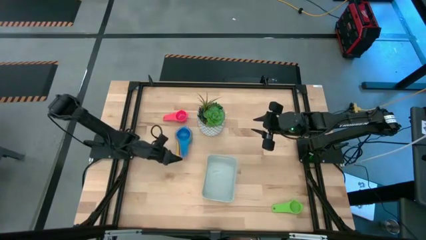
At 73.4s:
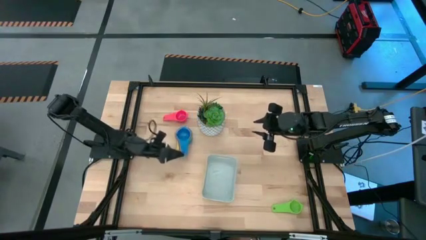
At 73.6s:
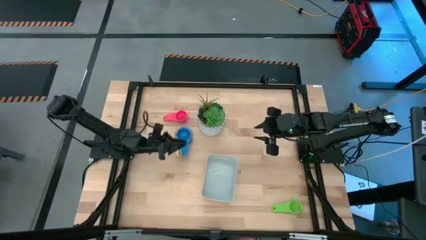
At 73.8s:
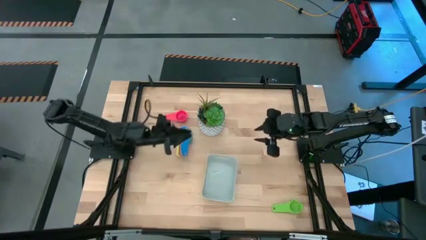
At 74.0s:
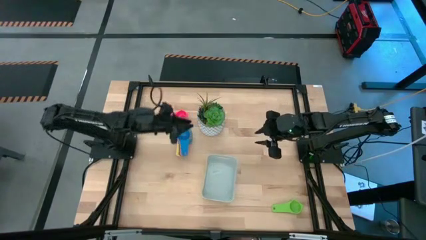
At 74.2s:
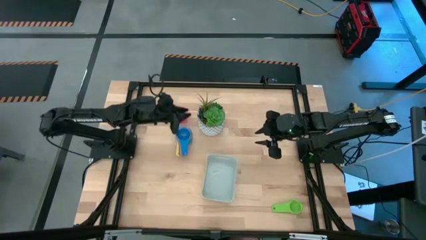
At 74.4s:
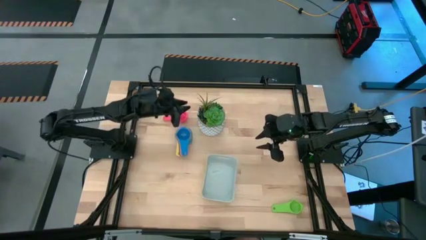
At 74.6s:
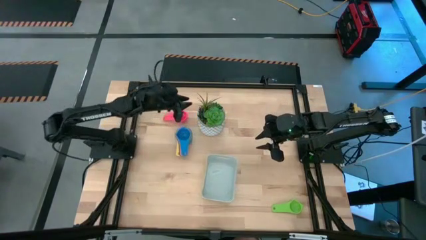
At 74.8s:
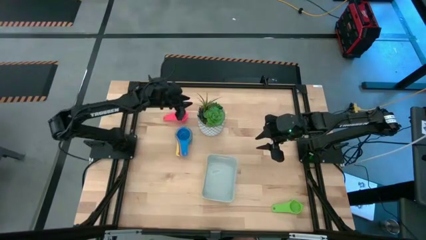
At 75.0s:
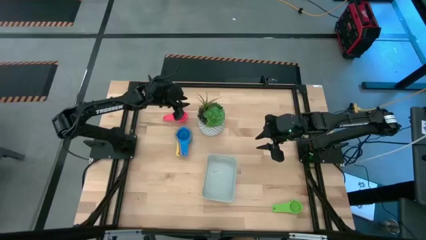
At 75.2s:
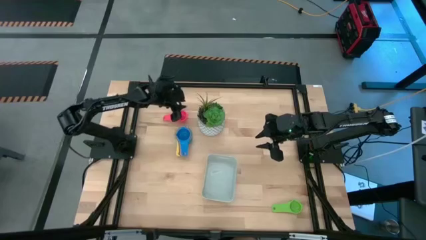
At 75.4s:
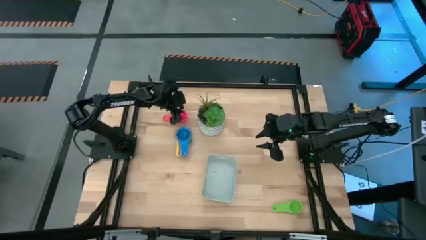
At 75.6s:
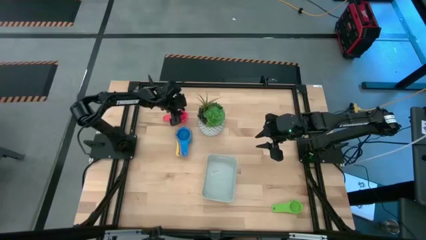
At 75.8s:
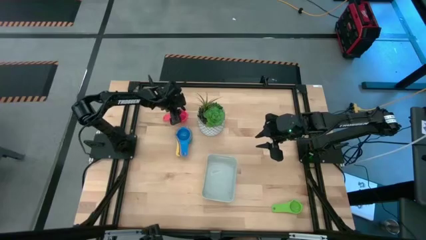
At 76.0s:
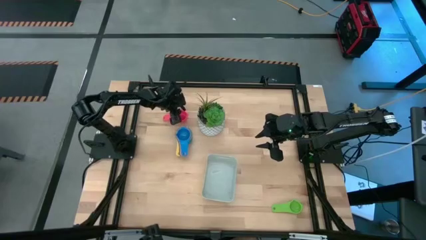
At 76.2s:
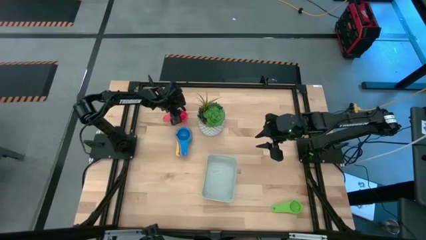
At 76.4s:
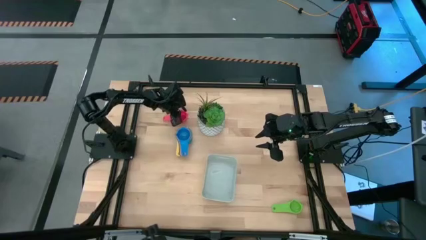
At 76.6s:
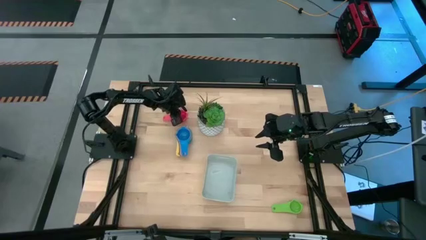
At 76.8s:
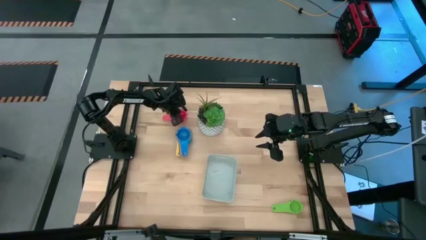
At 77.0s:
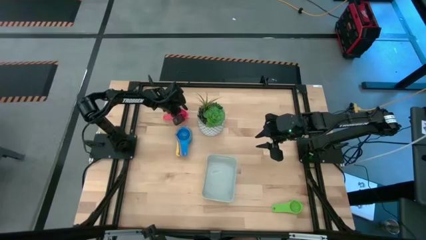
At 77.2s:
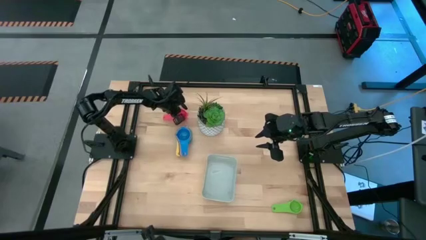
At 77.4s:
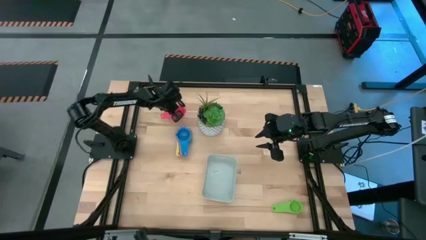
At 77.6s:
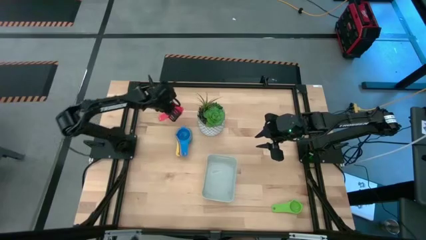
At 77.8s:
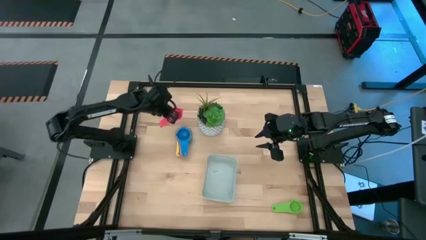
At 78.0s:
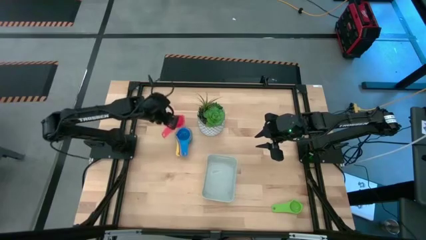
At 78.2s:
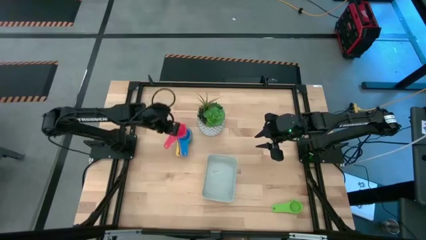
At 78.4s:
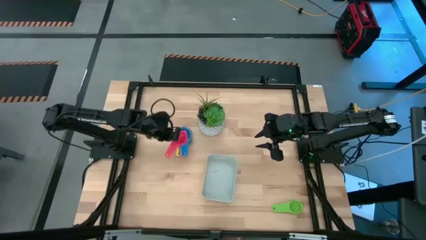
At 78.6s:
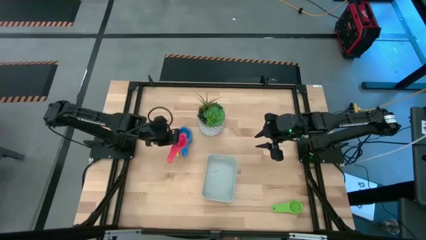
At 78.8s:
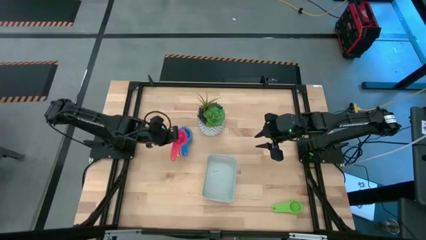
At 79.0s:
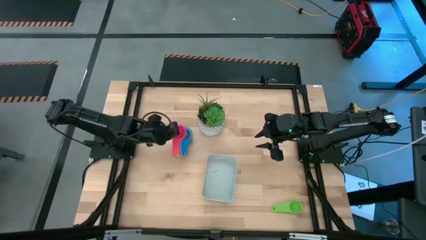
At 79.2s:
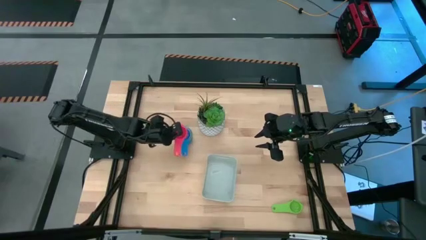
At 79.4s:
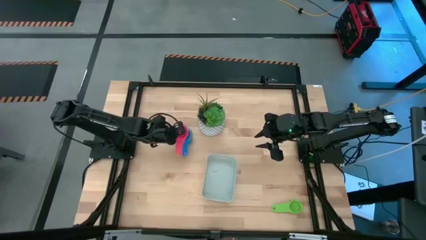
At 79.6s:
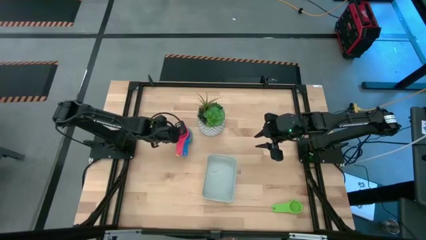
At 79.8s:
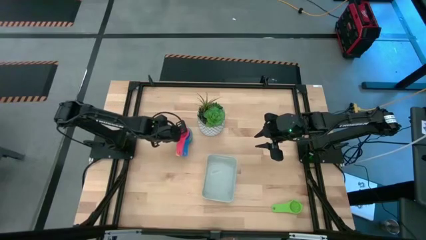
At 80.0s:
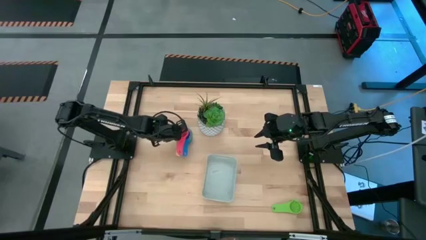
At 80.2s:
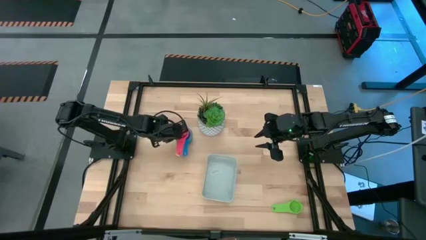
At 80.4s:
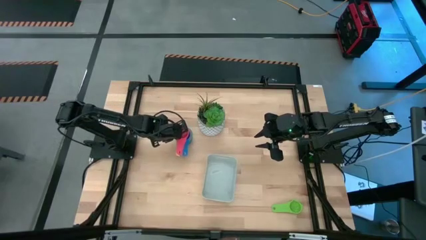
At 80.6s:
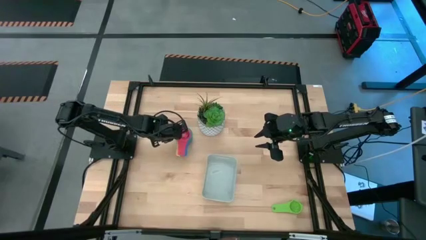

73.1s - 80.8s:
Task: Nest measuring cups in basket
Stack the pink measuring cup on top of the blue measuring cup

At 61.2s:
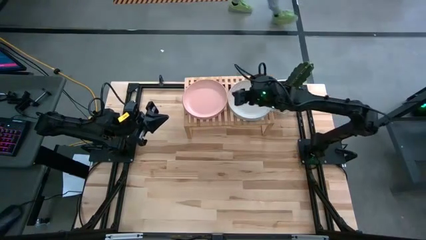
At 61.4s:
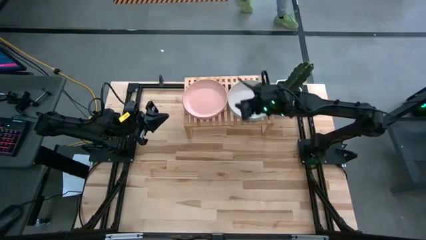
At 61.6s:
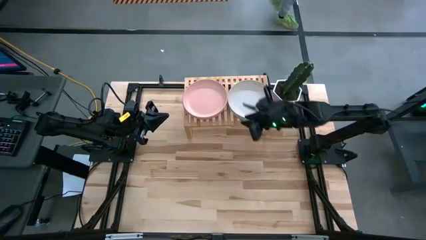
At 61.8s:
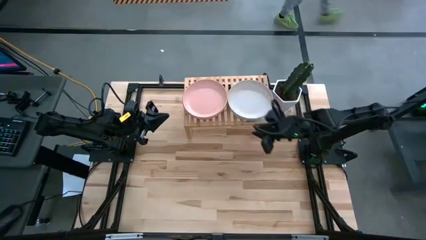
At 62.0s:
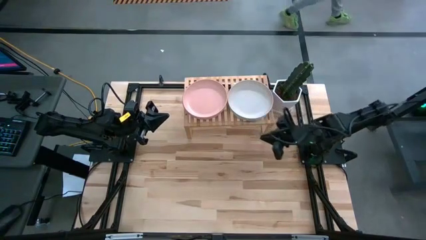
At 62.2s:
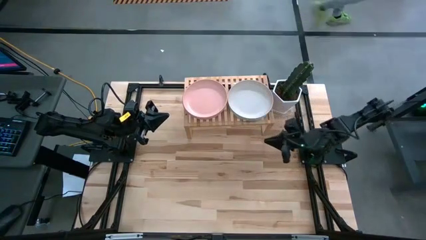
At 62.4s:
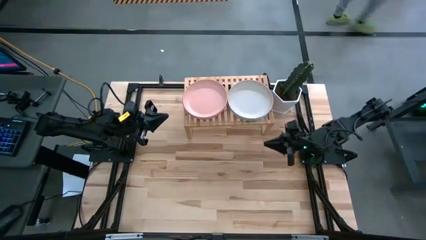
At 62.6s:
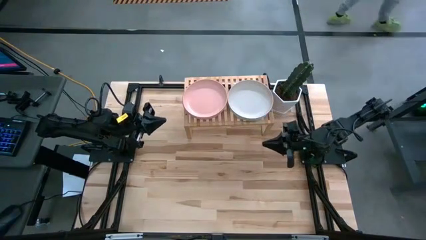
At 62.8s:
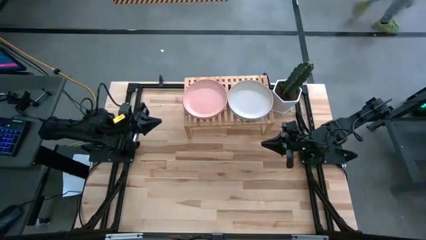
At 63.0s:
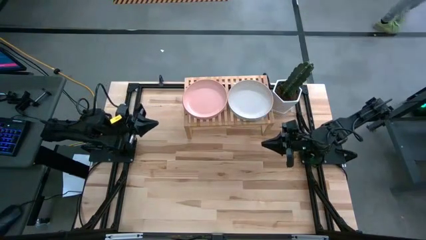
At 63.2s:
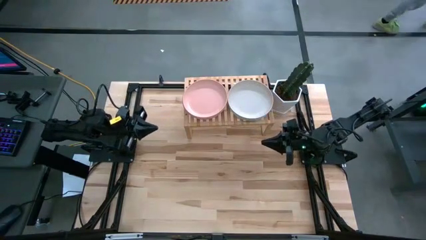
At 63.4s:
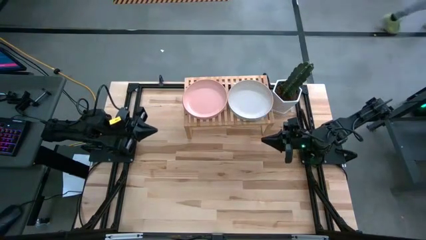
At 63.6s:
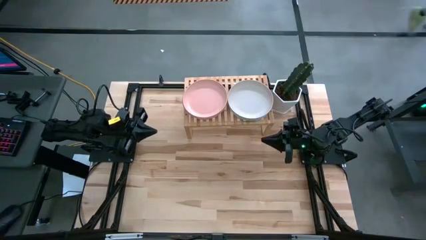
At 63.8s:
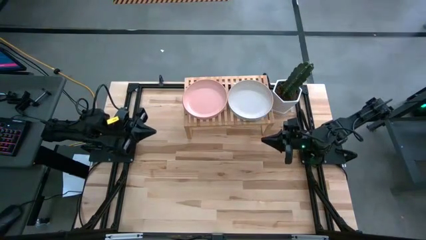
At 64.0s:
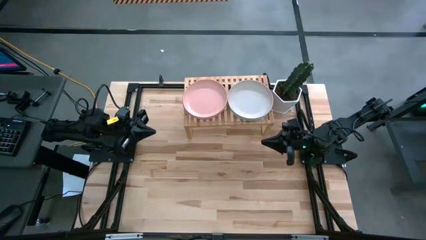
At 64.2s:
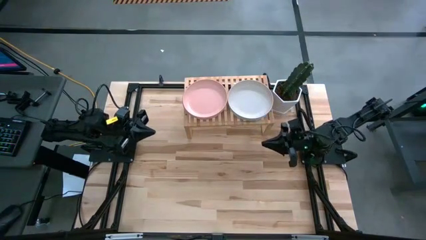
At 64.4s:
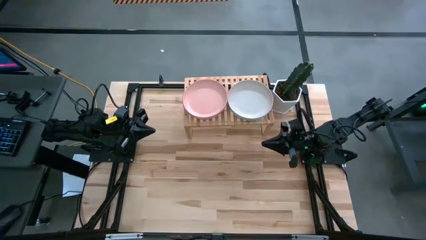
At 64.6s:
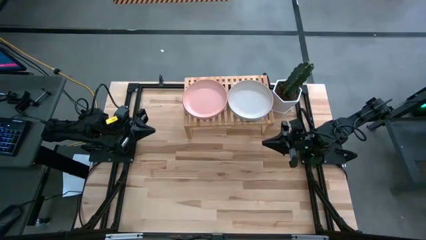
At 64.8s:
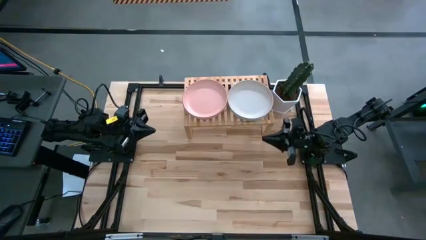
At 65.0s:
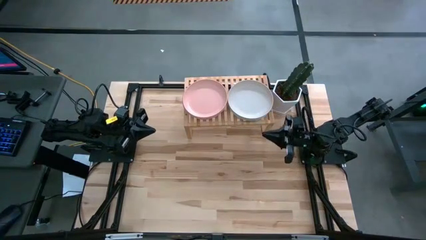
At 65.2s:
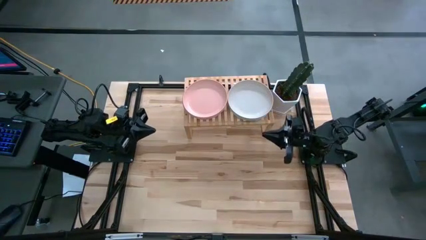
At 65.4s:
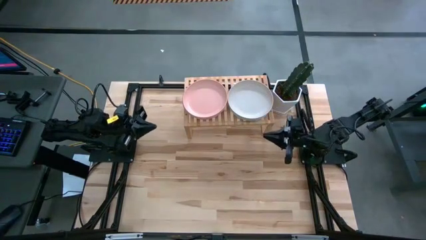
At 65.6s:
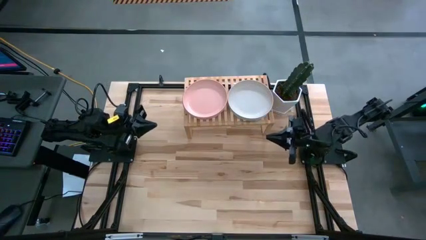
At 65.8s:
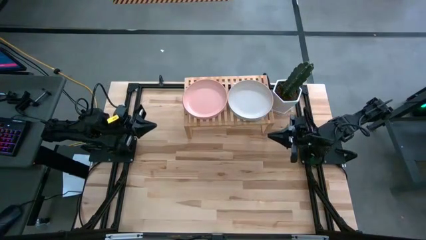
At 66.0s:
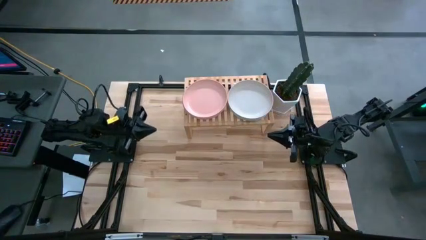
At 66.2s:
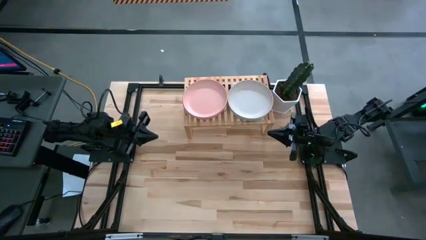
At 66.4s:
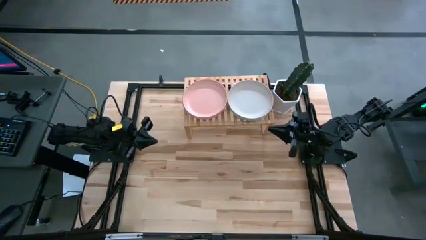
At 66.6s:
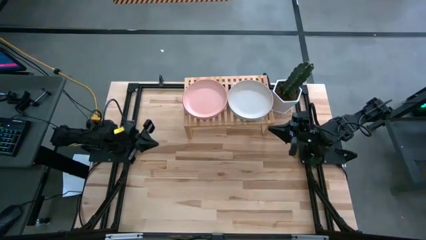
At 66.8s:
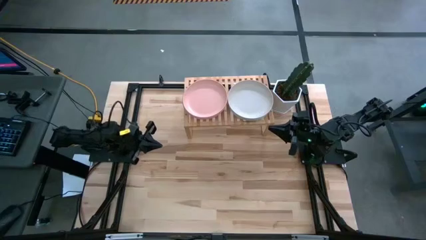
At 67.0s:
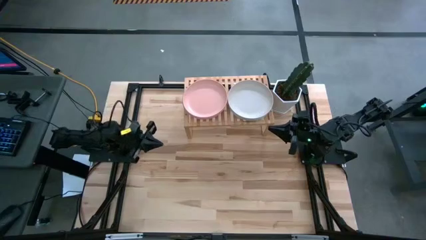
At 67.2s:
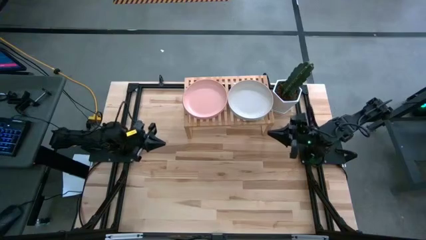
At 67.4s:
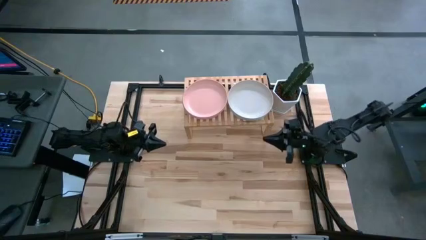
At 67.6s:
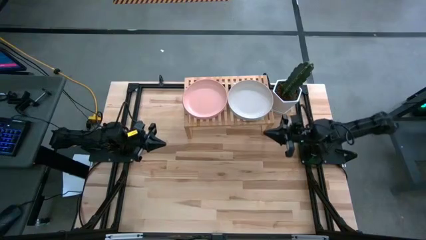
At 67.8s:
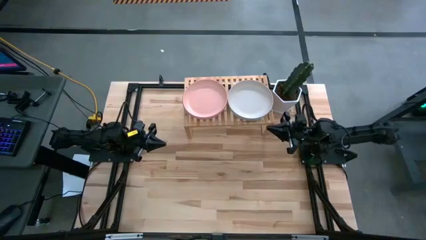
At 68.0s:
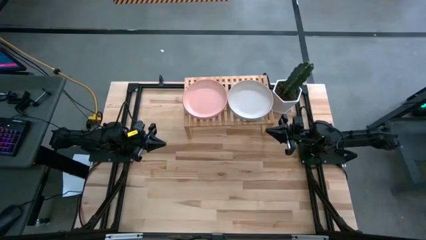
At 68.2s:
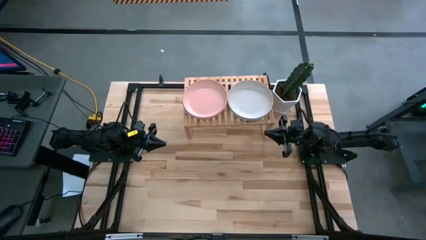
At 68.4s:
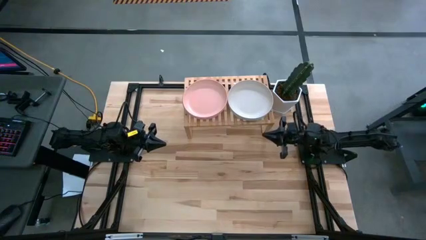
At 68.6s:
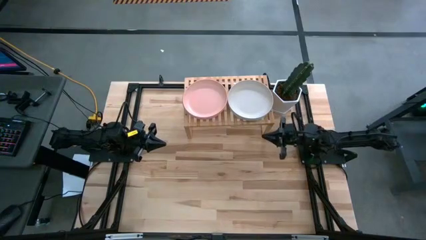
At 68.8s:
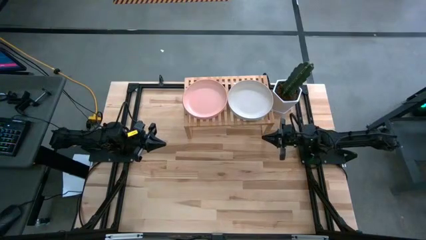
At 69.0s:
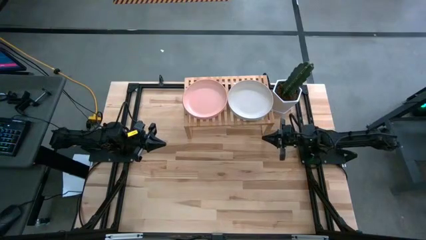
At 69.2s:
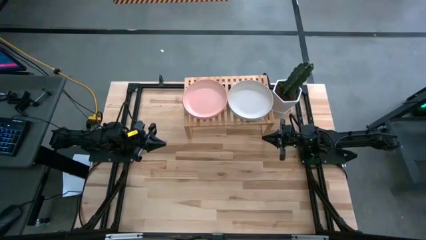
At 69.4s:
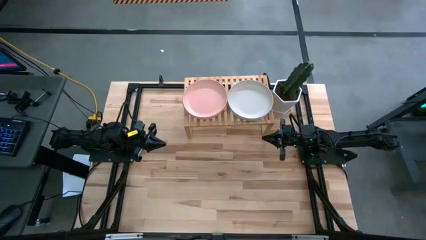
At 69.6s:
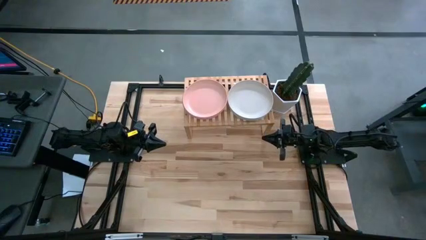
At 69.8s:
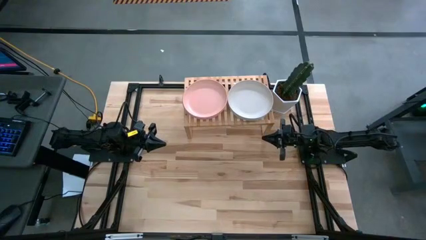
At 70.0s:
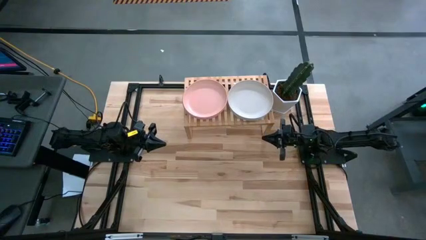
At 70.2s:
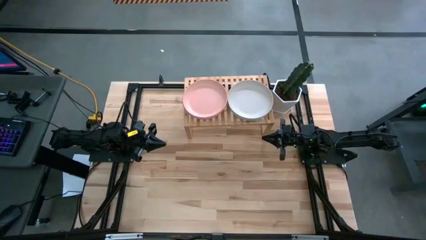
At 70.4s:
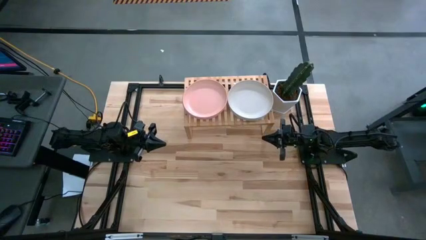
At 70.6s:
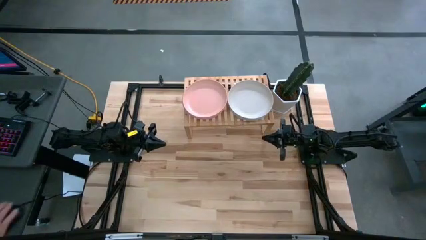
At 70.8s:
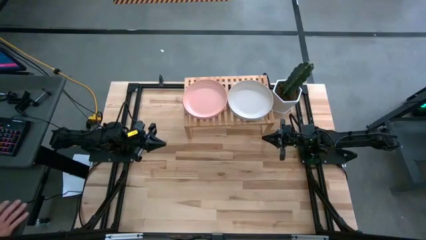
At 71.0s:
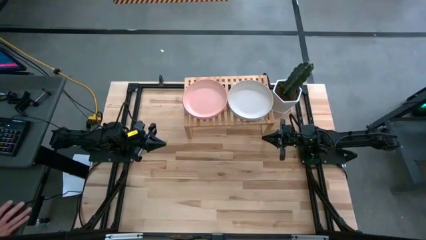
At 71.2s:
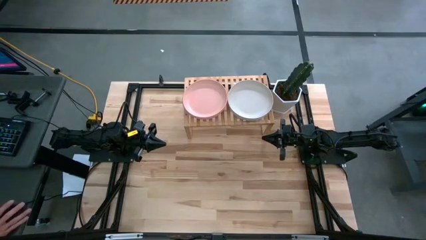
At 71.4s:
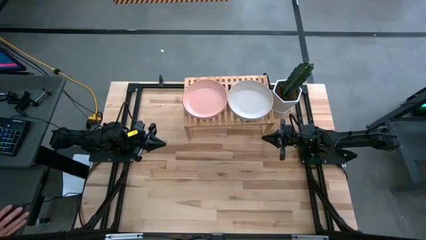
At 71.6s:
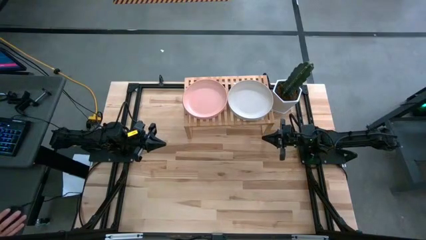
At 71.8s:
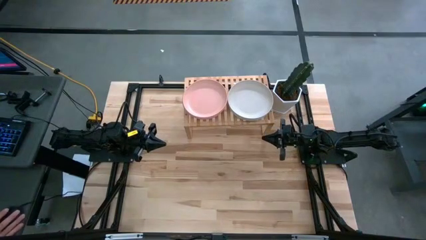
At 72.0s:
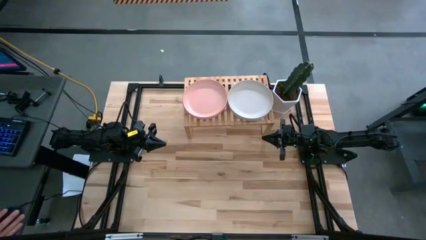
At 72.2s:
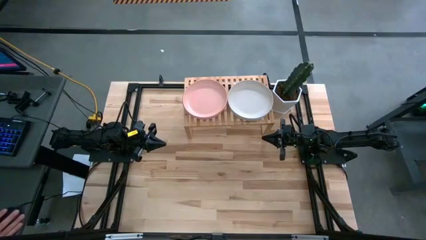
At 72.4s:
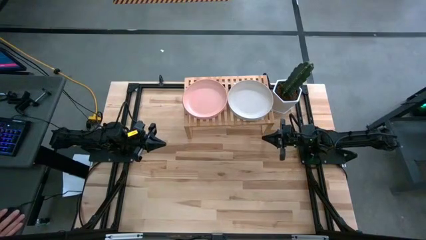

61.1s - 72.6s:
Task: Place and stack plates onto a shelf
Return to Home Position
